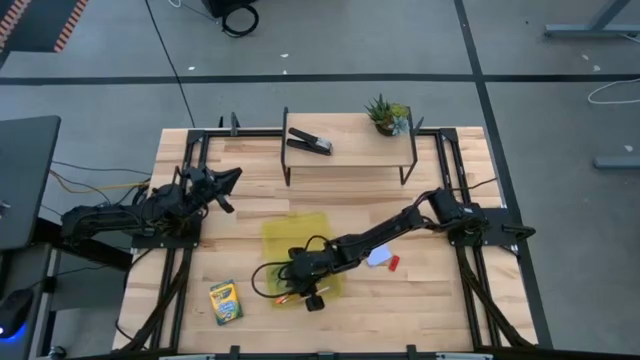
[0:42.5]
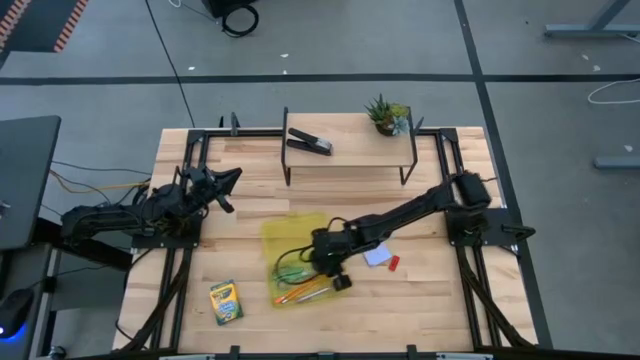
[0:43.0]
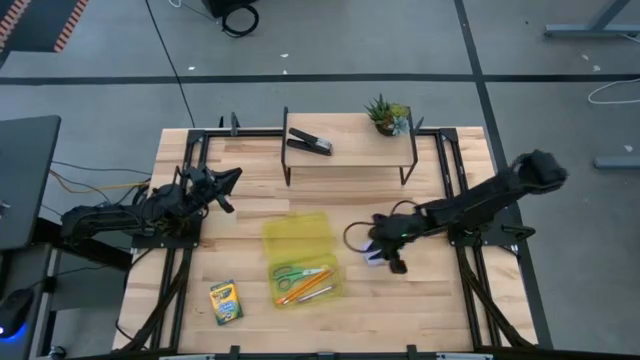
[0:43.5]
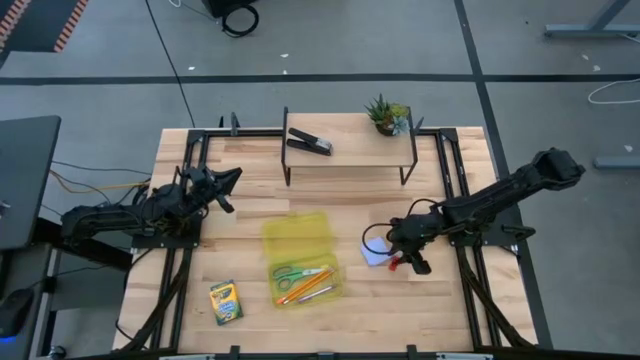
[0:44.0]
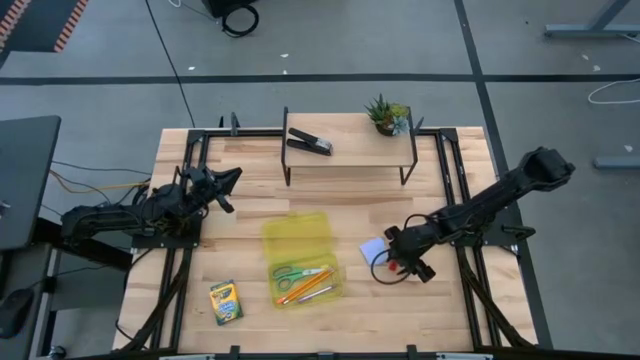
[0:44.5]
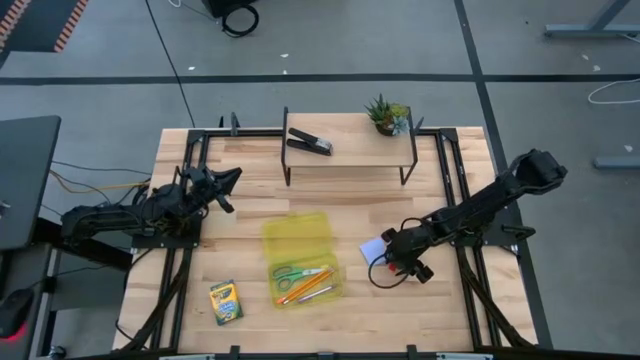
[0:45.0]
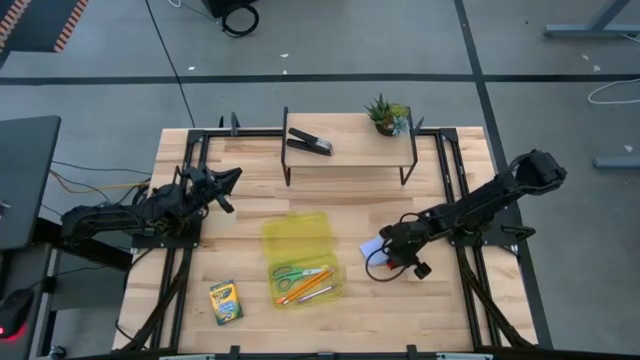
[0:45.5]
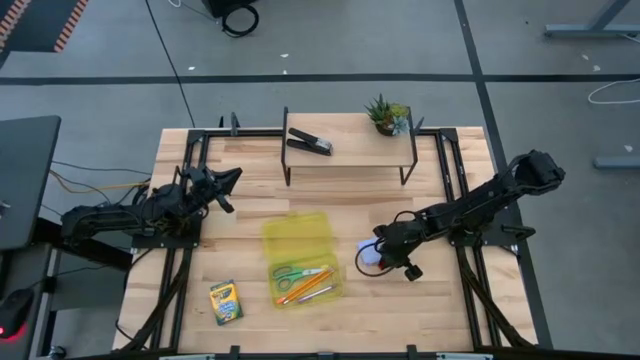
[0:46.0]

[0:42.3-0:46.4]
Task: Pack school essentials
Put the red eraser into the yellow supply box

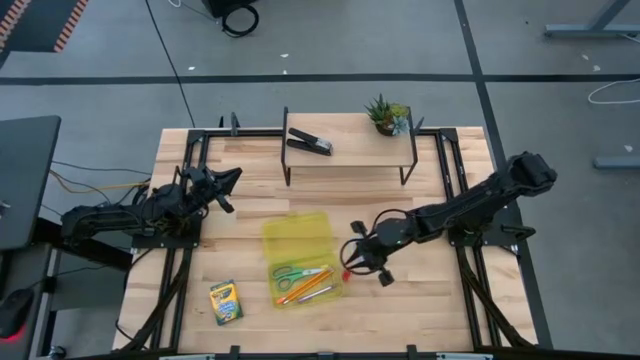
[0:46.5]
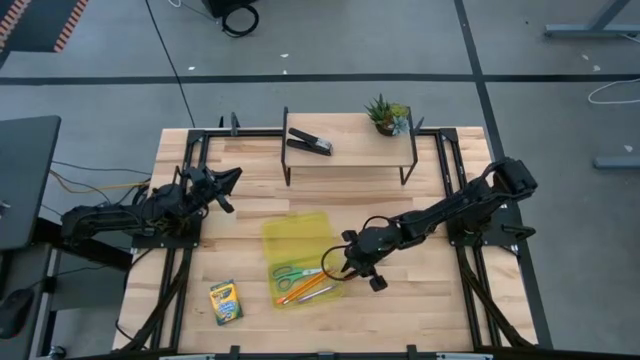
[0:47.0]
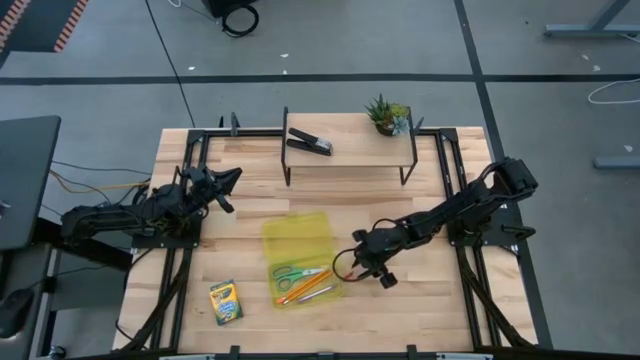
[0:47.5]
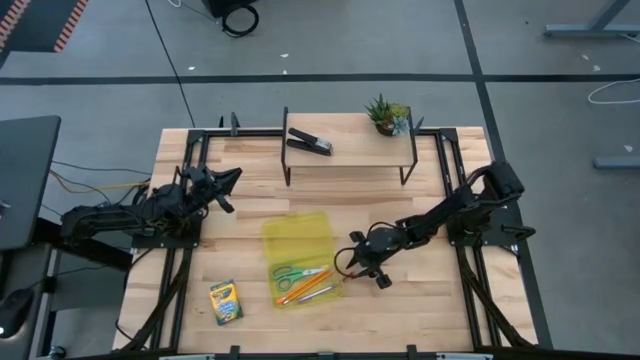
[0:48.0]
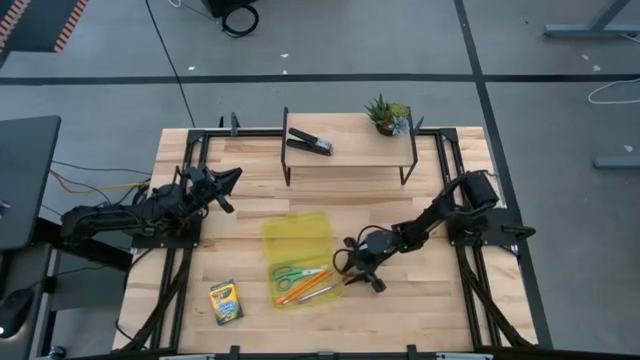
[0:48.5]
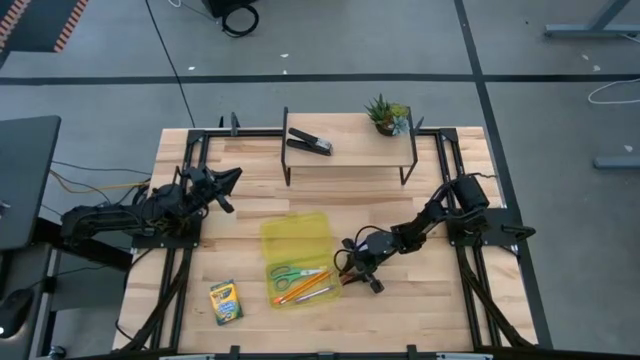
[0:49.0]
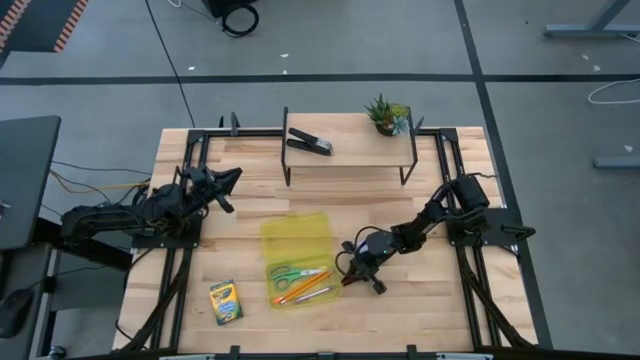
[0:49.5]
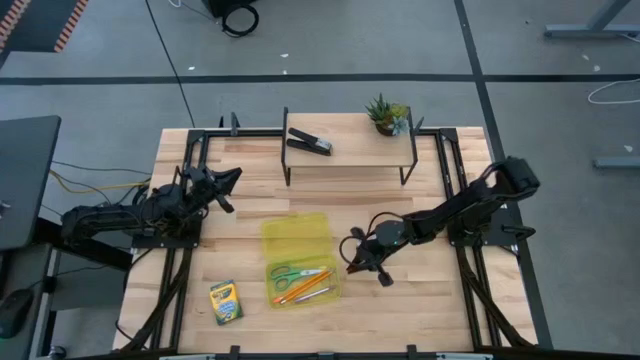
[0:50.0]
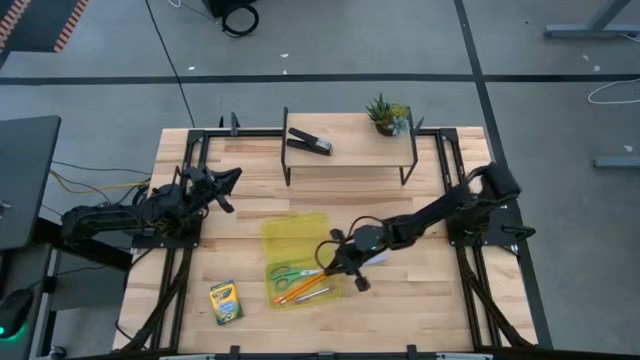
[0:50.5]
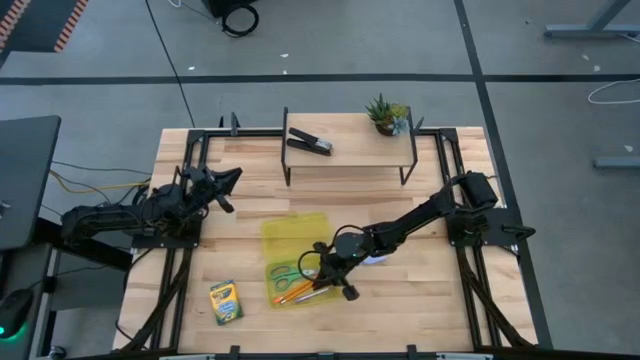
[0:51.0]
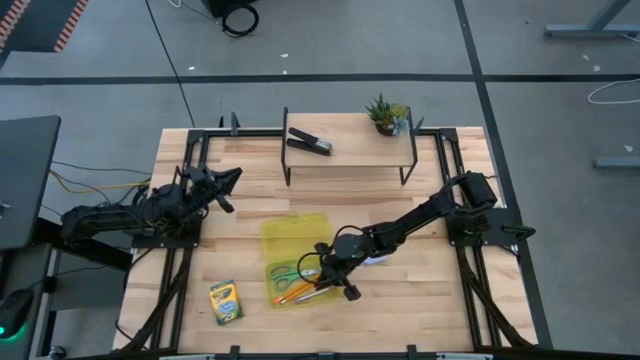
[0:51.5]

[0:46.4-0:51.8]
Put the red eraser into the yellow supply box

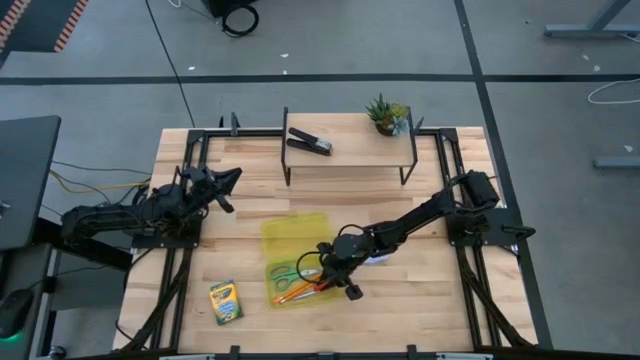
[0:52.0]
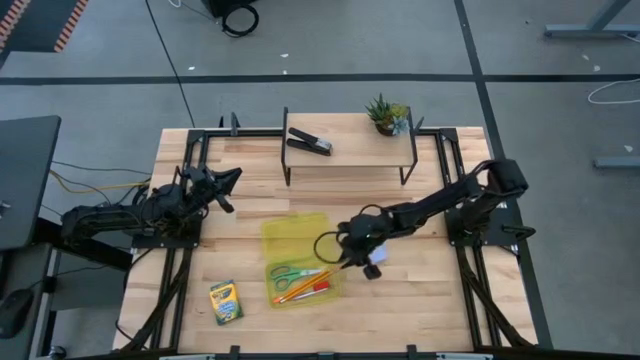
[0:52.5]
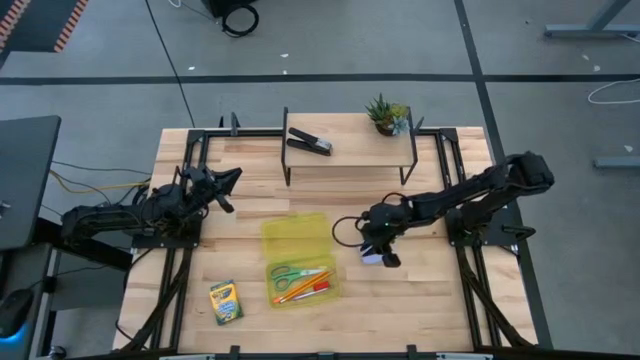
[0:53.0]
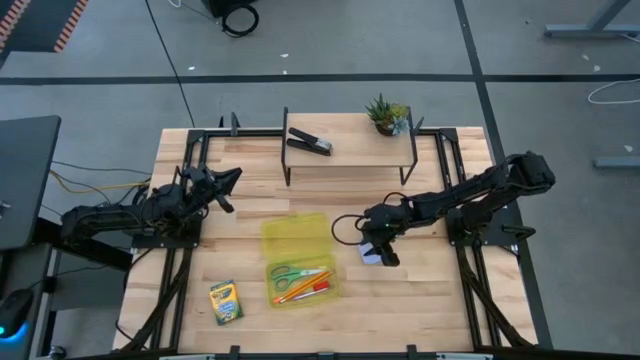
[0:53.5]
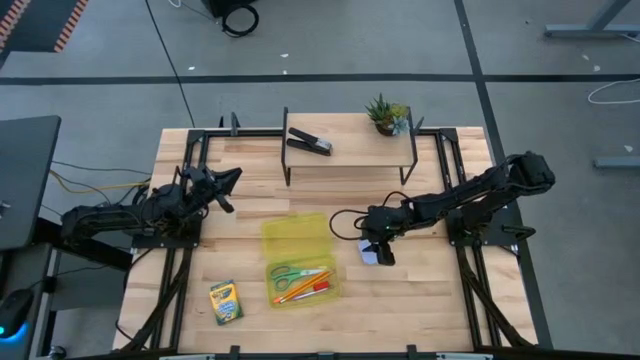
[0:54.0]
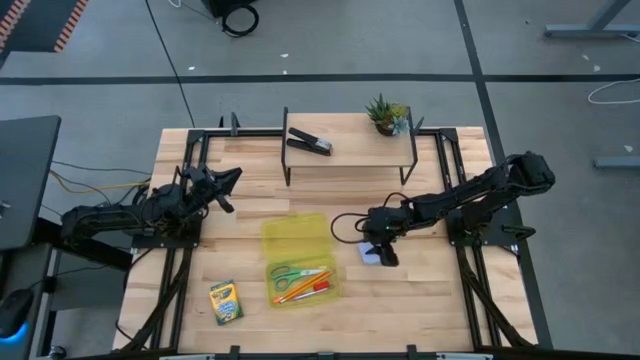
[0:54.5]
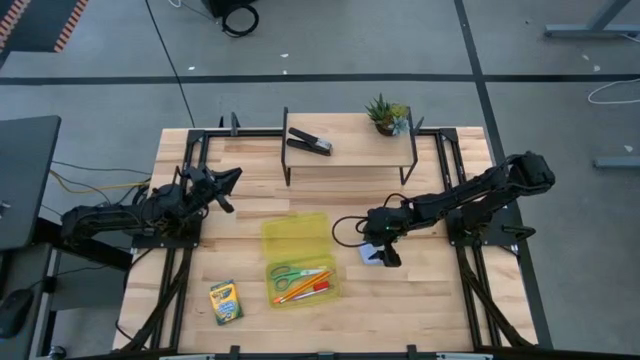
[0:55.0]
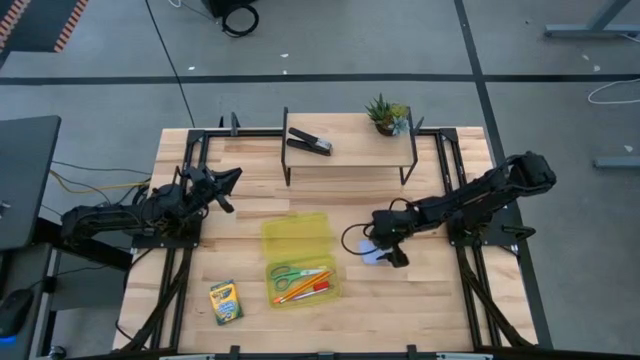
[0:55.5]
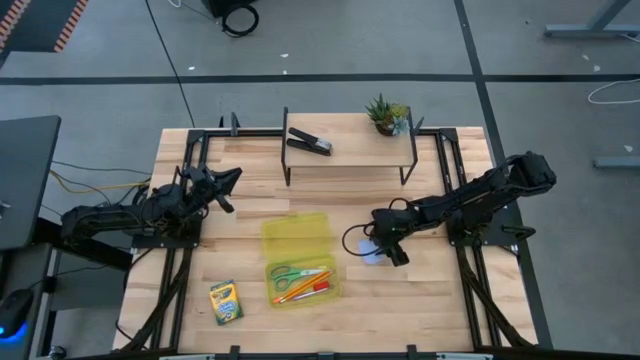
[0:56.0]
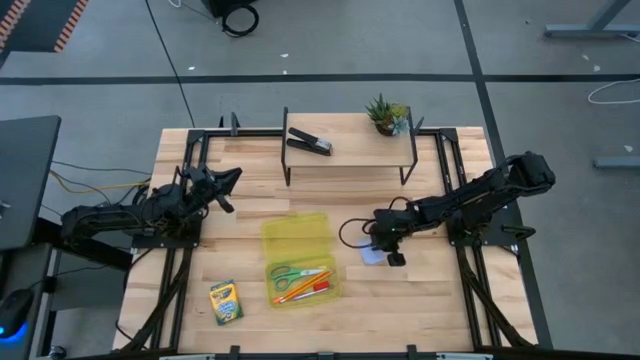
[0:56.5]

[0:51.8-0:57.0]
Put the purple notes into the yellow supply box

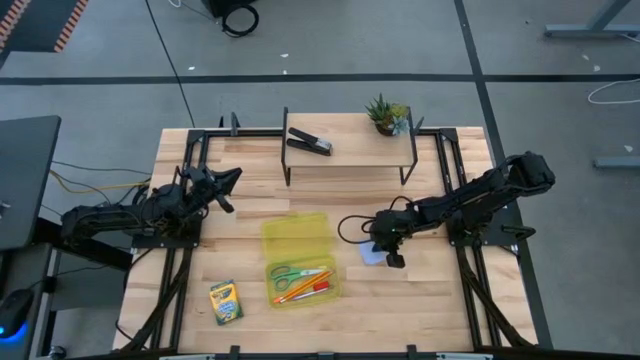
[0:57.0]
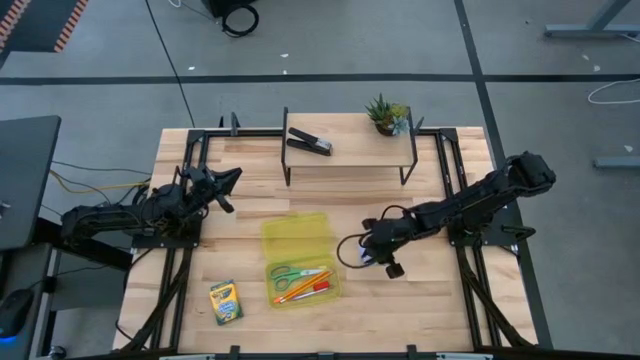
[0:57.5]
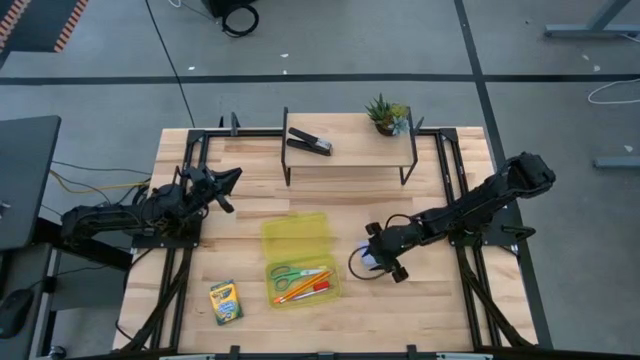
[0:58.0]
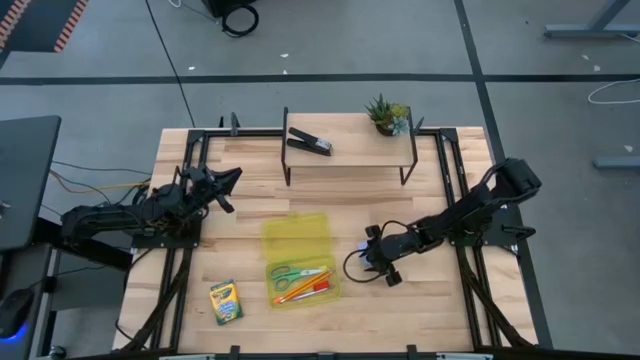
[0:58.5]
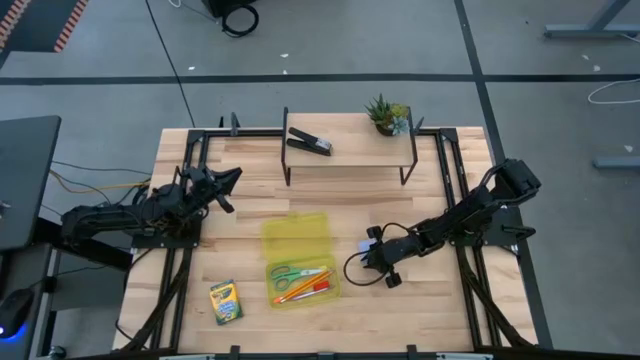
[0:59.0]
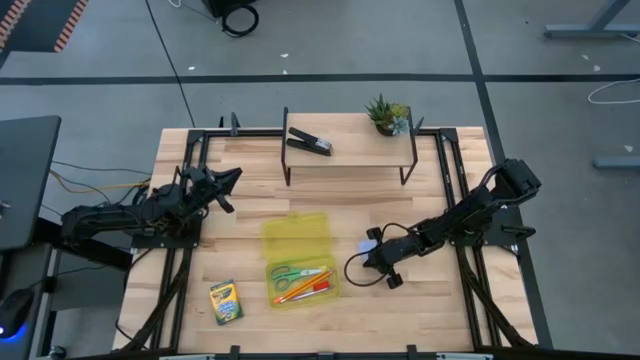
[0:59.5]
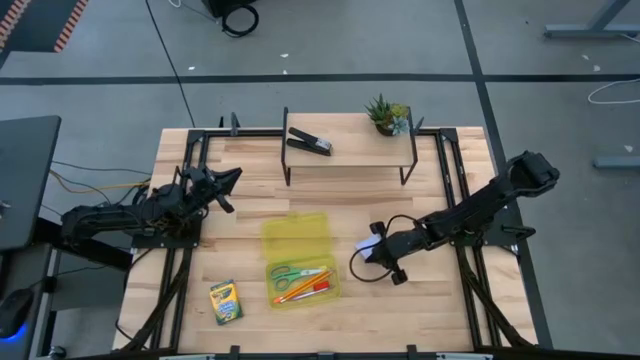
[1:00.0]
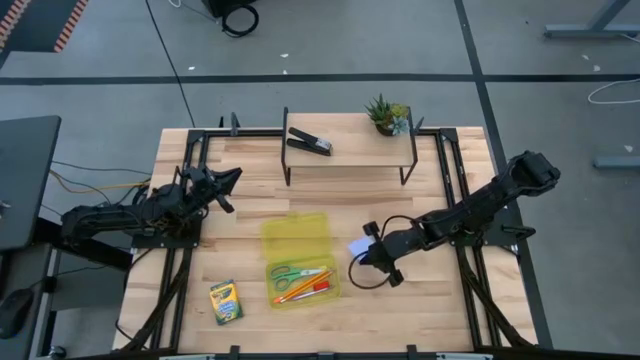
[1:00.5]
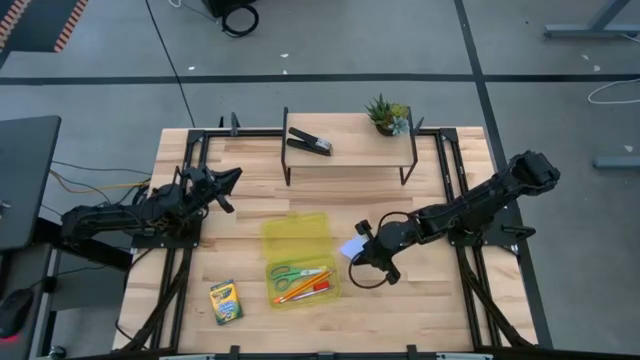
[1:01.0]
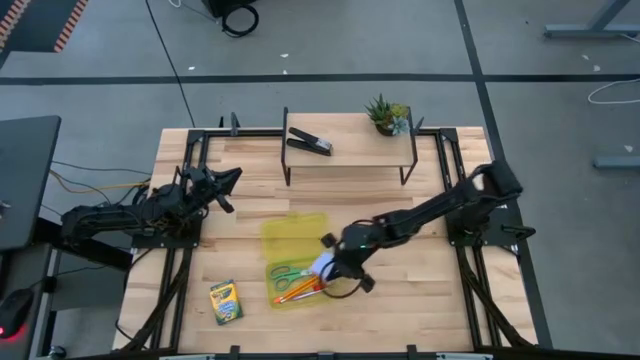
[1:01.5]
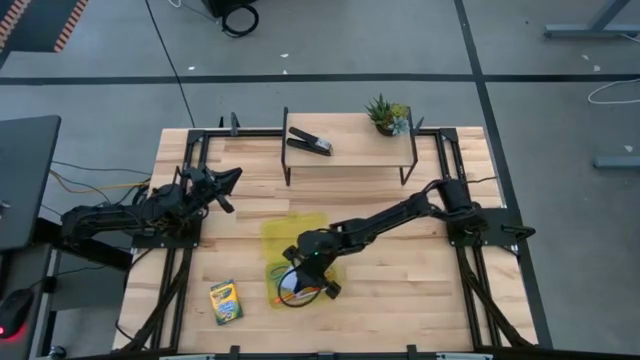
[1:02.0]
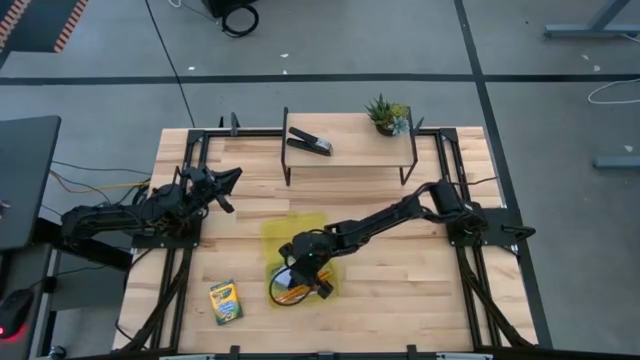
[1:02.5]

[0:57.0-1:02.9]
Put the purple notes into the yellow supply box

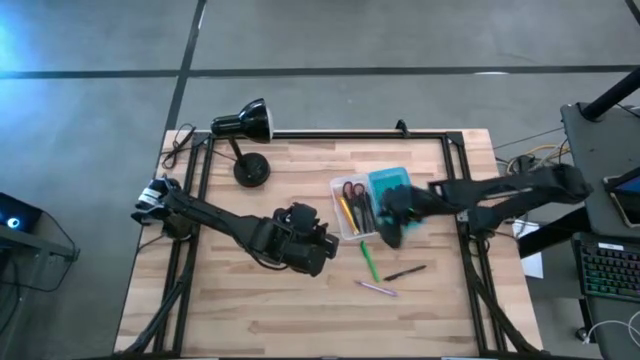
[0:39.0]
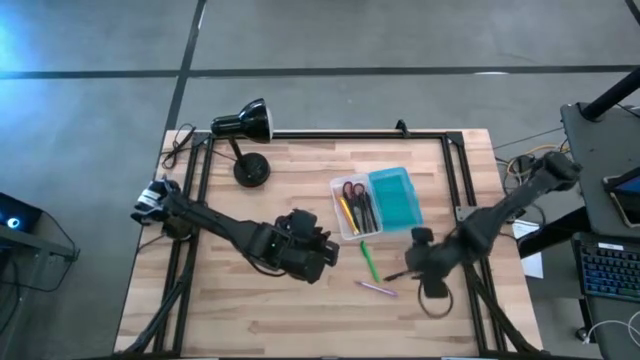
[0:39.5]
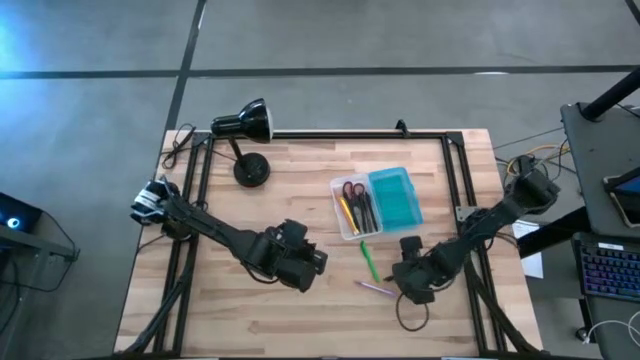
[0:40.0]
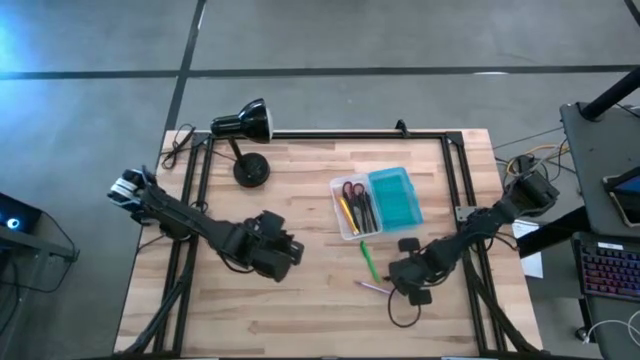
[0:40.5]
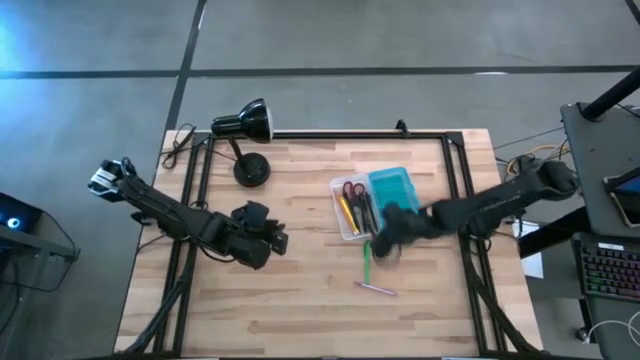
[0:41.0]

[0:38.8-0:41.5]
Task: Pick & place school supplies into a supply box
Put the black pen into the blue supply box
